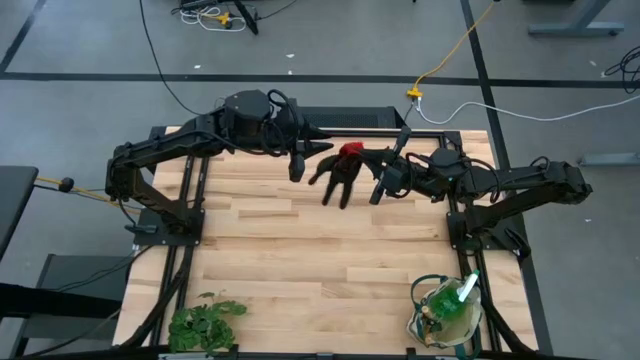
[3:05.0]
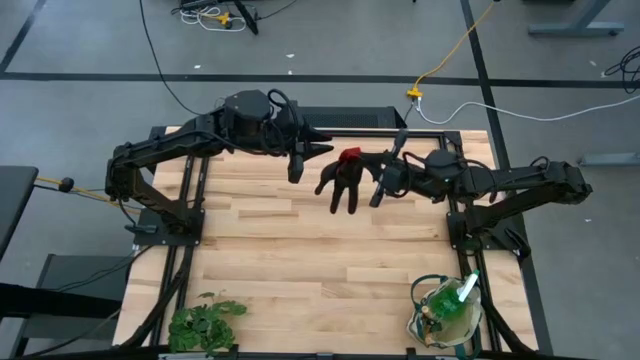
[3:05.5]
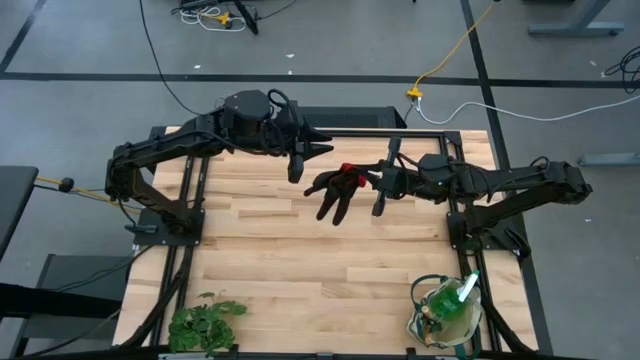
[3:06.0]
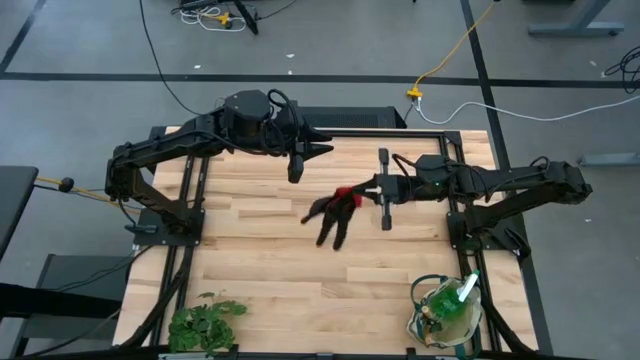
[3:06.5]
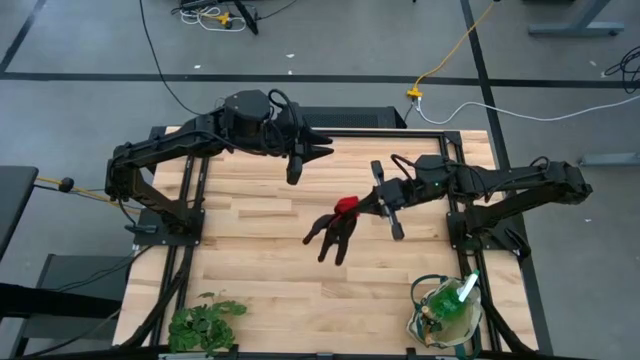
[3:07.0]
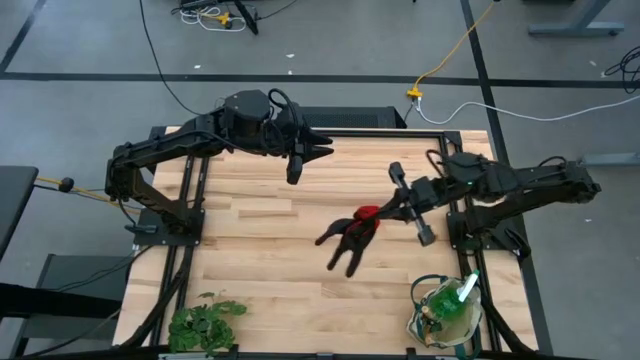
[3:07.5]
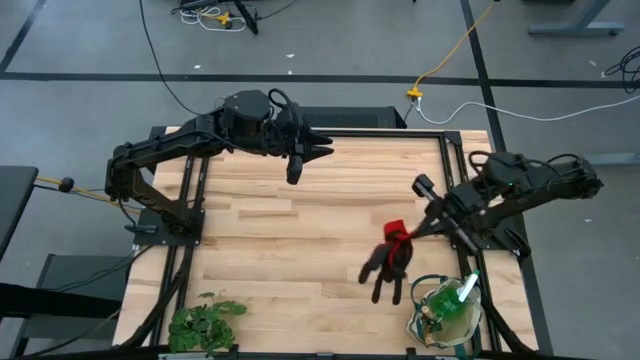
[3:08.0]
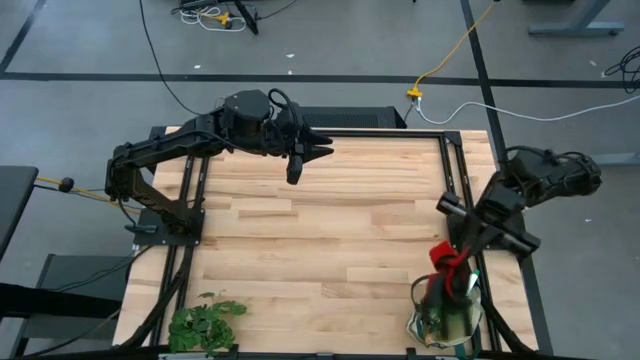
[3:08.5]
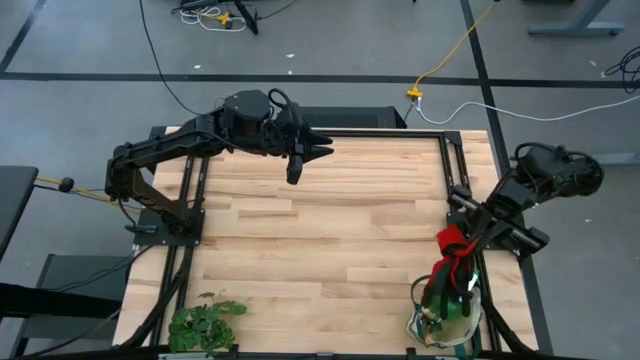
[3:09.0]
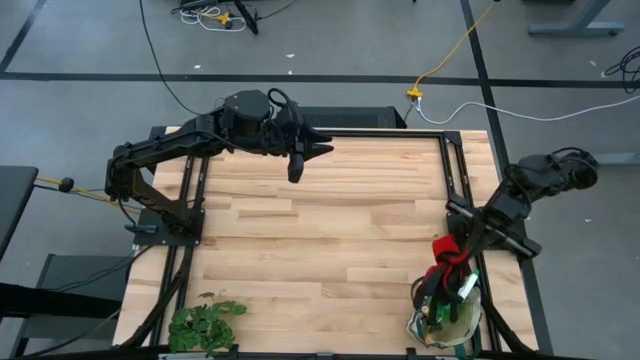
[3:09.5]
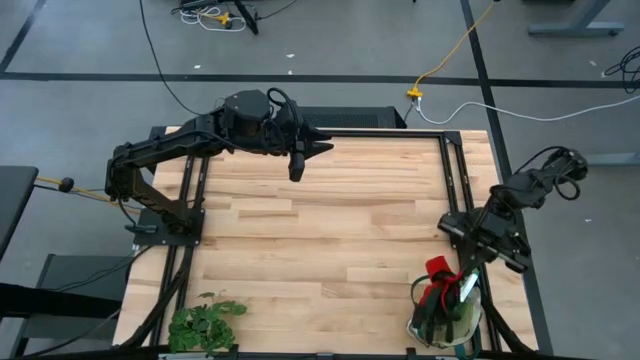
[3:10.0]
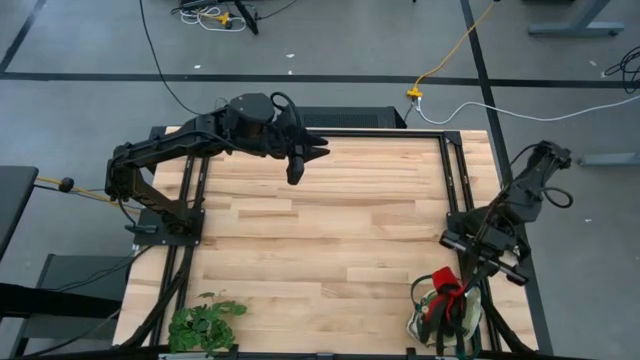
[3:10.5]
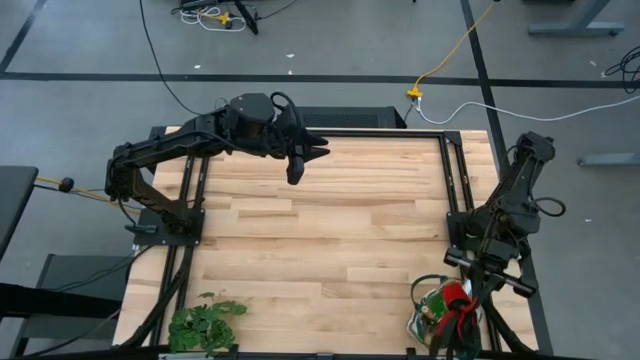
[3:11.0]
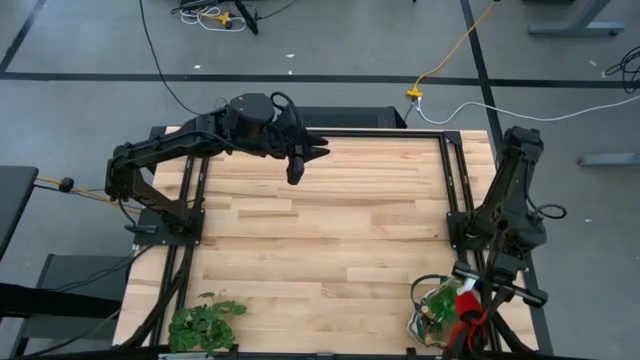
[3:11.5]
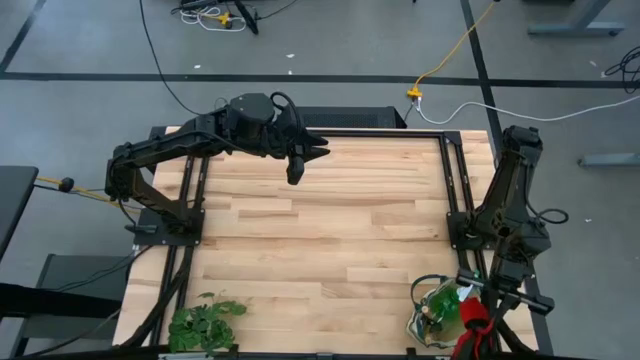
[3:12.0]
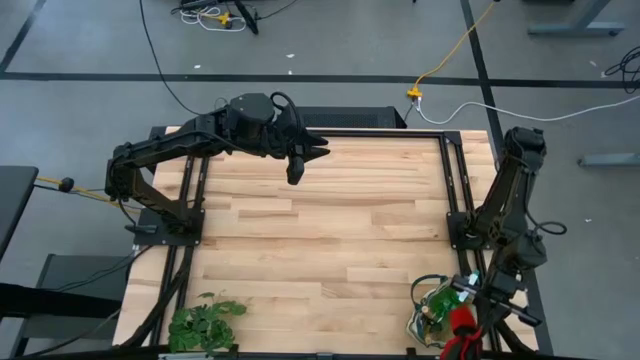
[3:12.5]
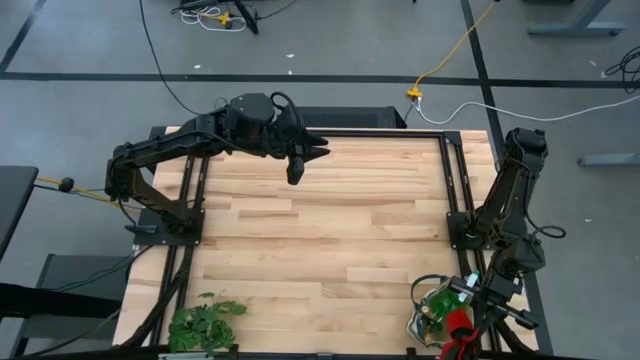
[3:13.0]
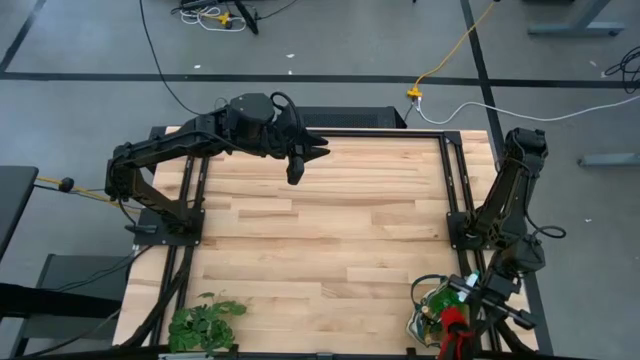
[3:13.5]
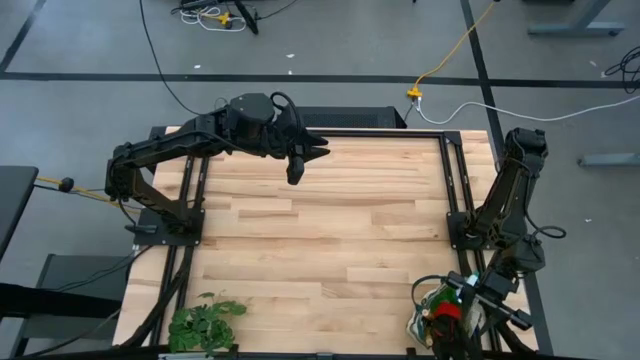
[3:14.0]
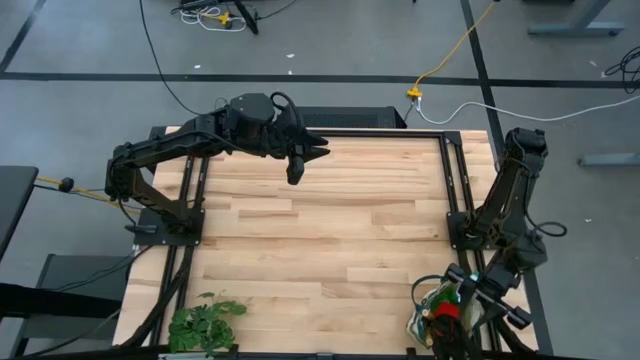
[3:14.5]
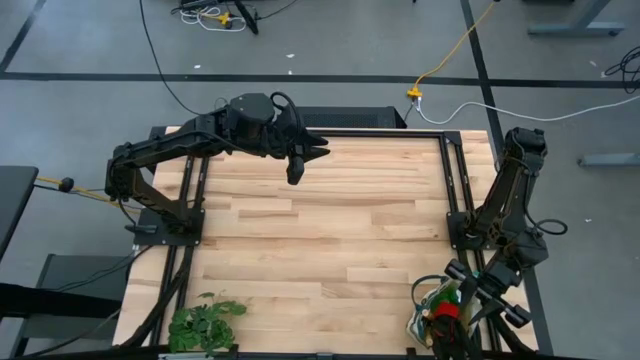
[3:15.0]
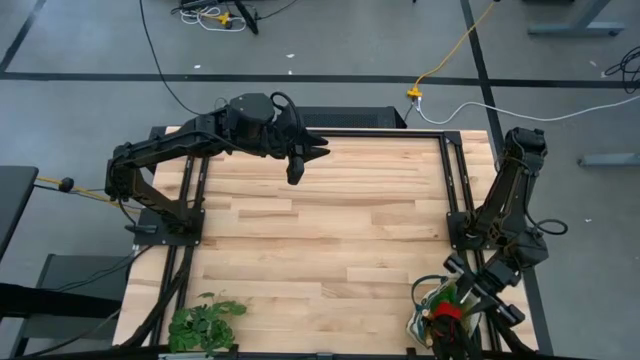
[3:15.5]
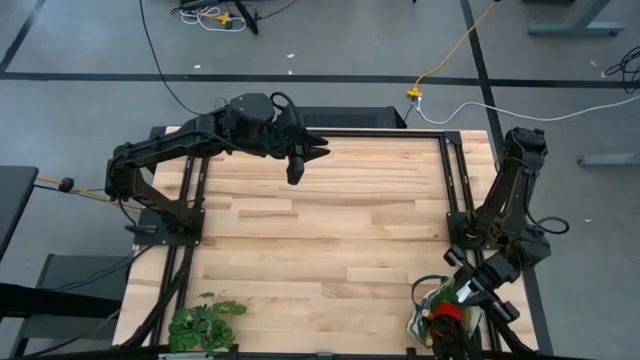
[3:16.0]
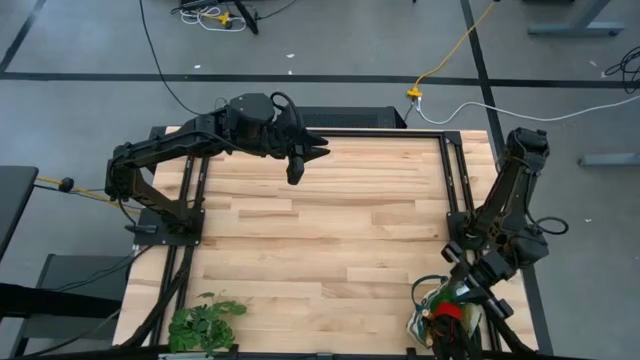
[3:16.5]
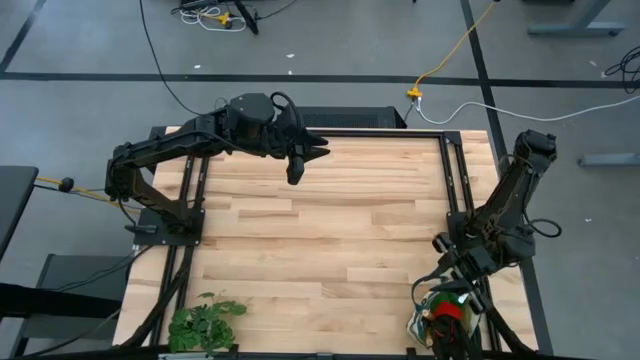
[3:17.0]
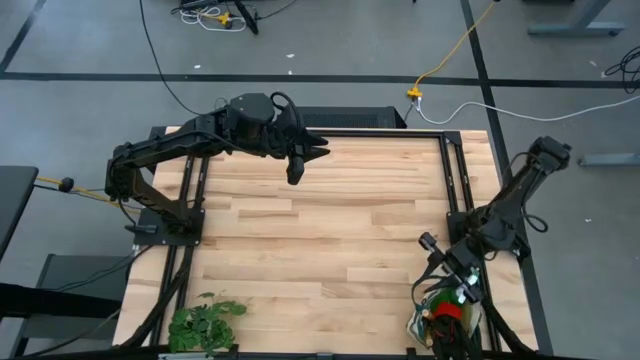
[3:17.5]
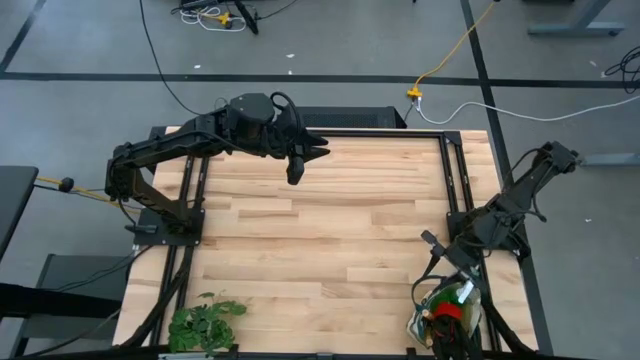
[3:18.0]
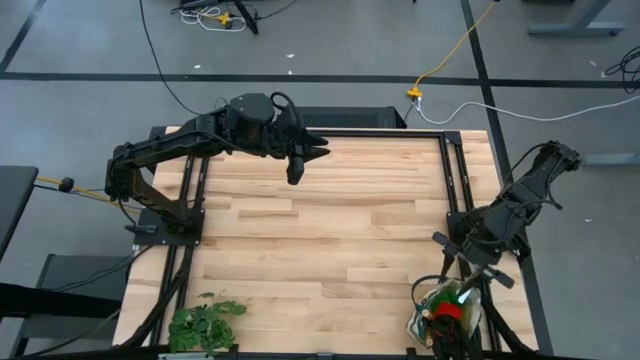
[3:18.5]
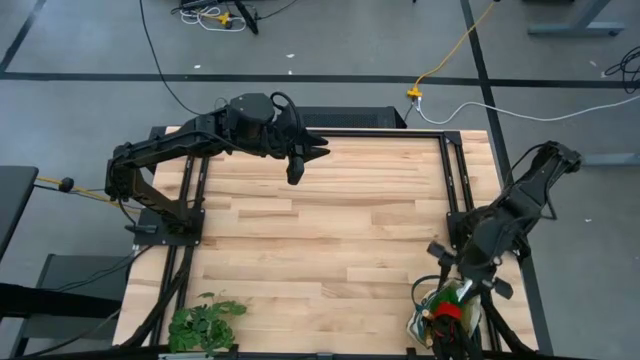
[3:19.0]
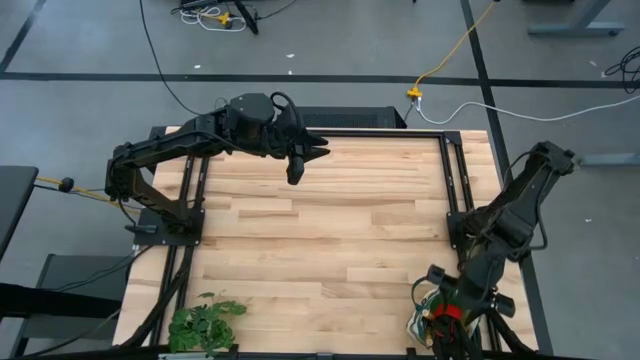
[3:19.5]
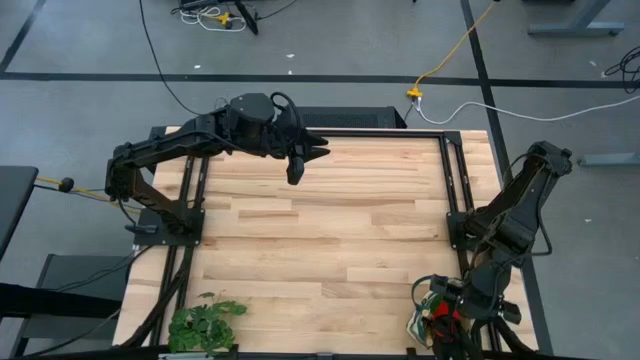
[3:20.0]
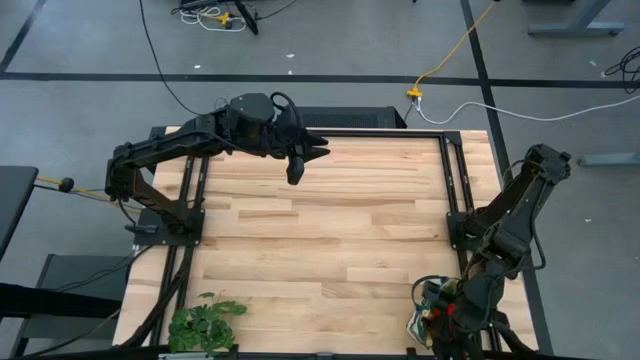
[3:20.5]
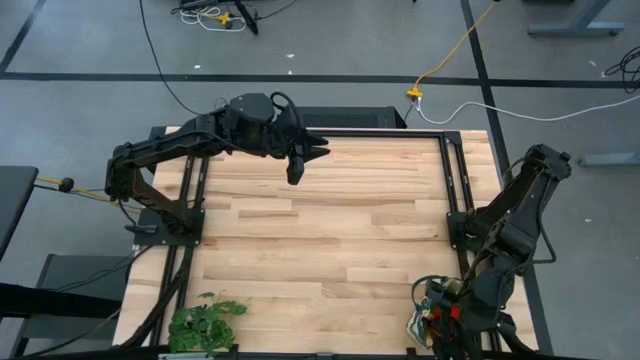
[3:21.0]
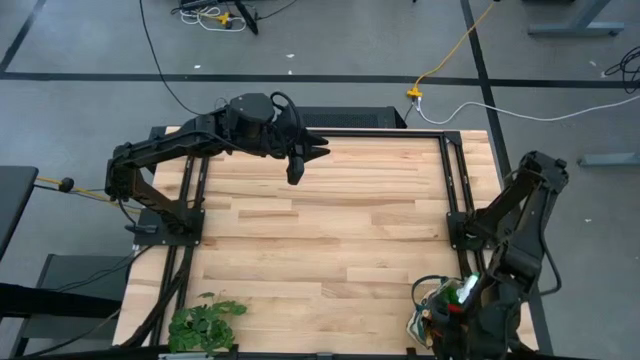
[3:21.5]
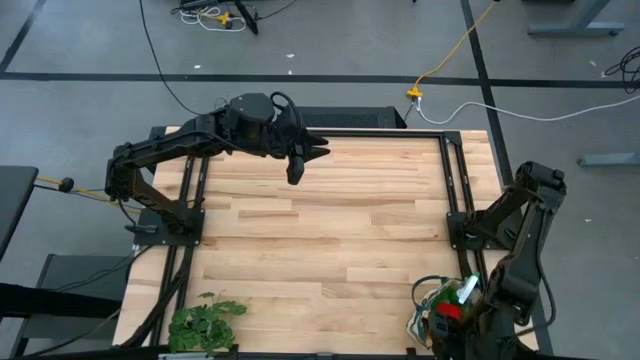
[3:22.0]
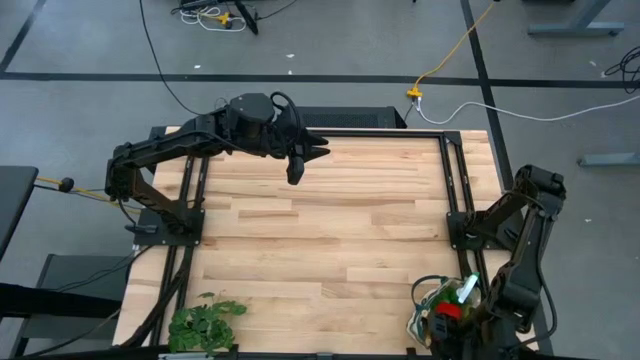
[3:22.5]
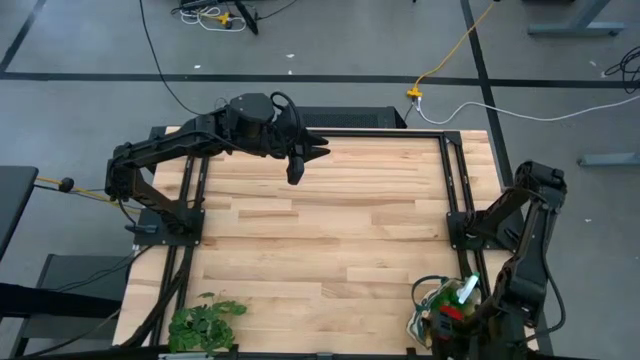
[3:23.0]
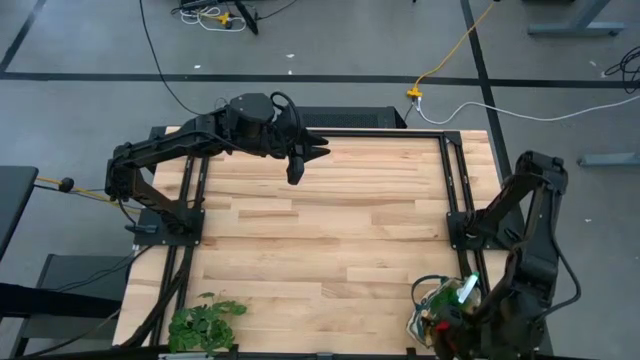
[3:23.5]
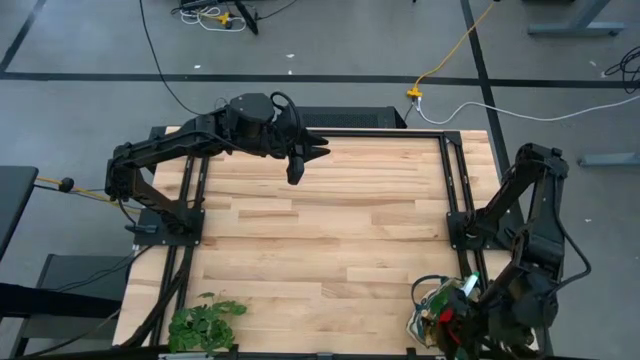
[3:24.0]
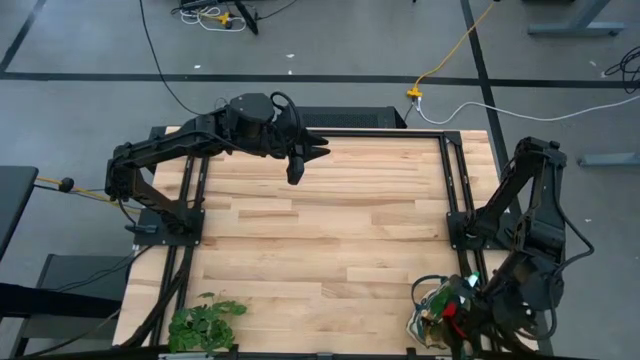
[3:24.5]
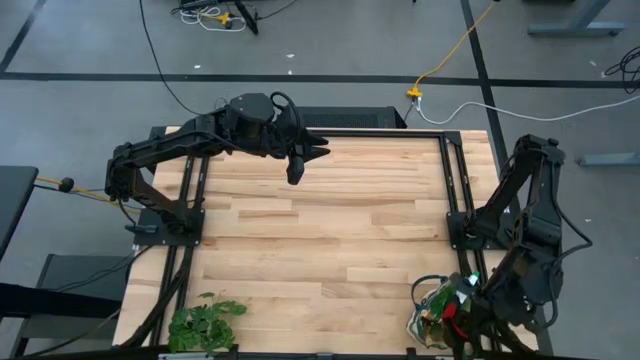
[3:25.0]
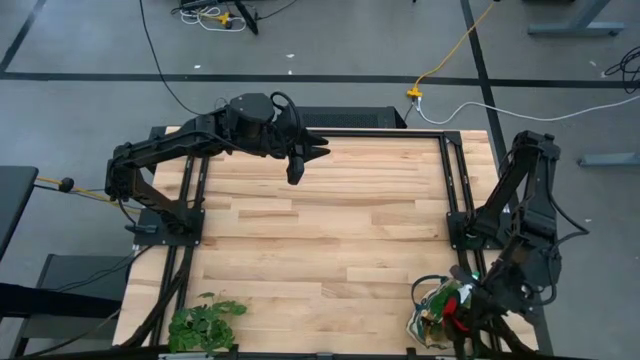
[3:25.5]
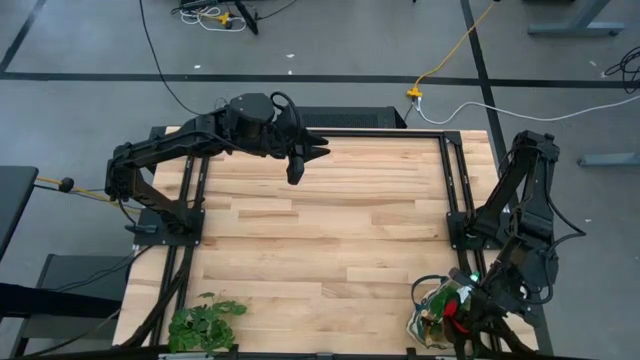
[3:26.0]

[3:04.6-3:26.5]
Task: Pick & Place Garden tools in Gardening bag
Put the red gloves into the gardening bag
